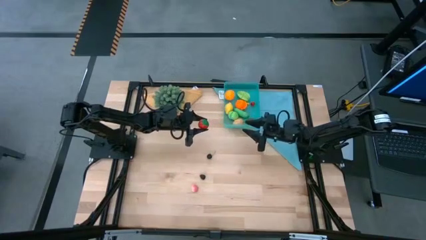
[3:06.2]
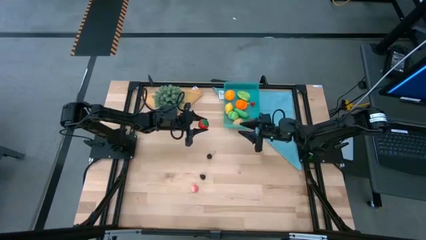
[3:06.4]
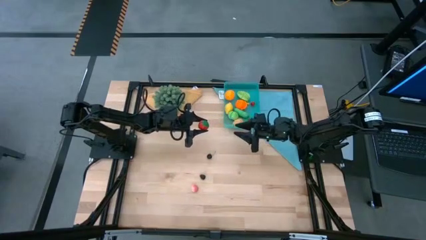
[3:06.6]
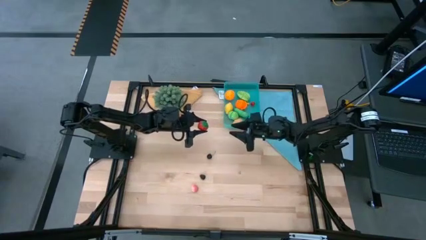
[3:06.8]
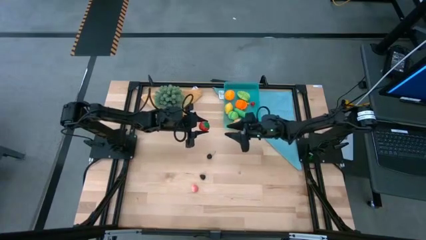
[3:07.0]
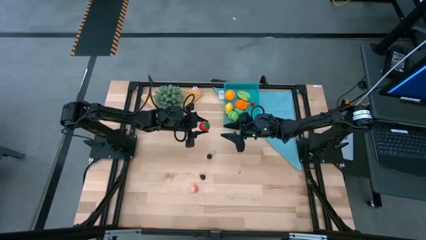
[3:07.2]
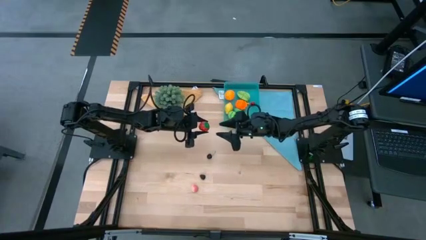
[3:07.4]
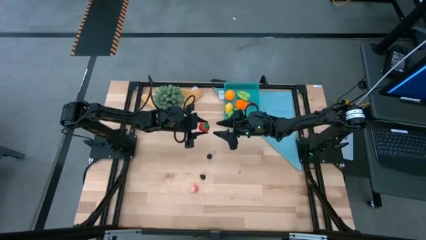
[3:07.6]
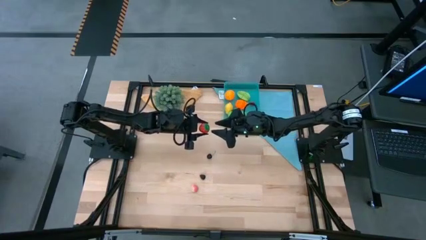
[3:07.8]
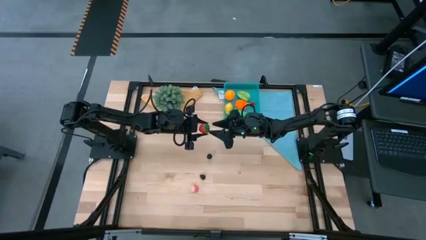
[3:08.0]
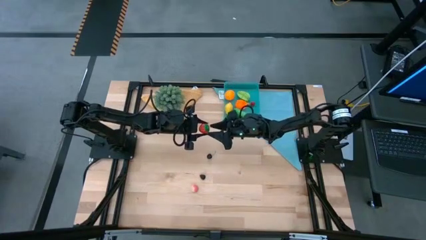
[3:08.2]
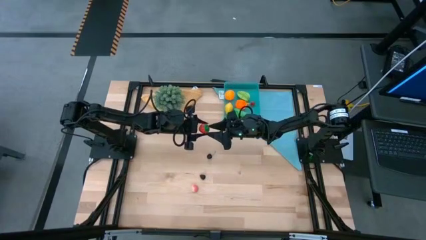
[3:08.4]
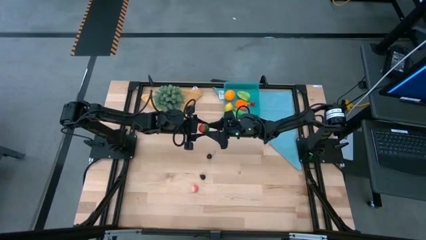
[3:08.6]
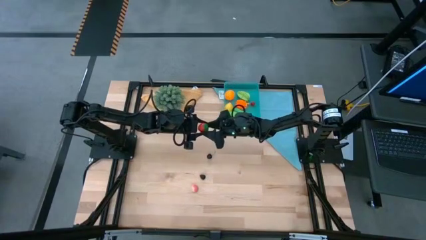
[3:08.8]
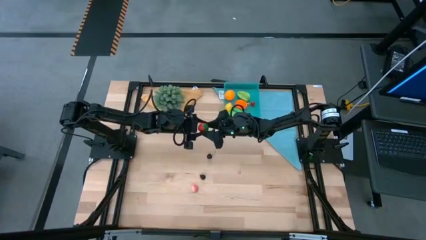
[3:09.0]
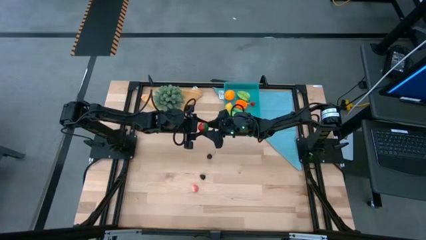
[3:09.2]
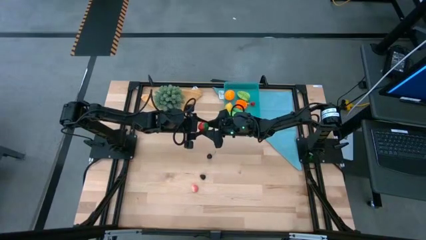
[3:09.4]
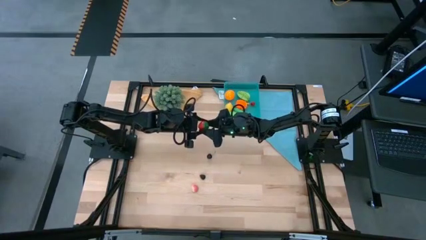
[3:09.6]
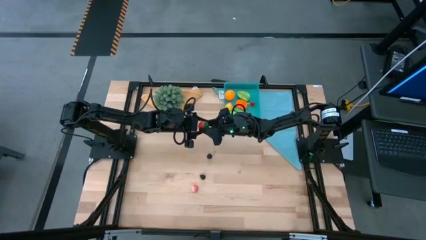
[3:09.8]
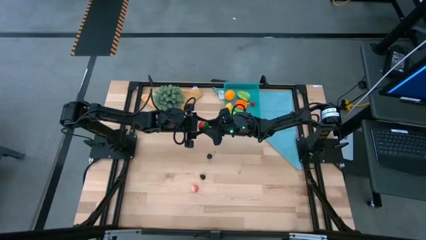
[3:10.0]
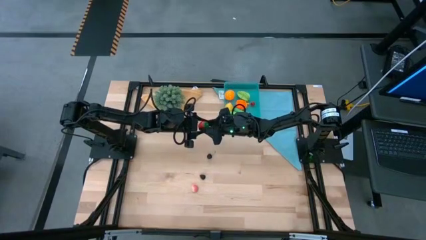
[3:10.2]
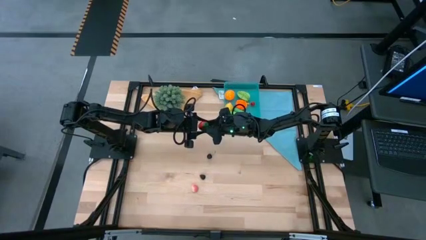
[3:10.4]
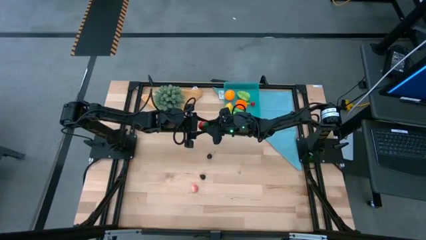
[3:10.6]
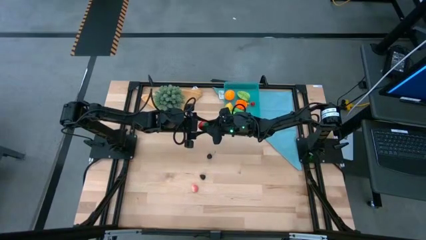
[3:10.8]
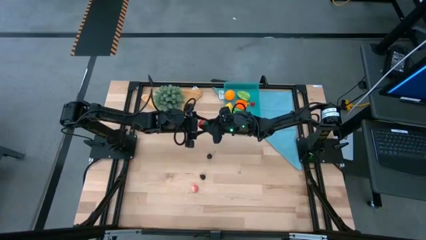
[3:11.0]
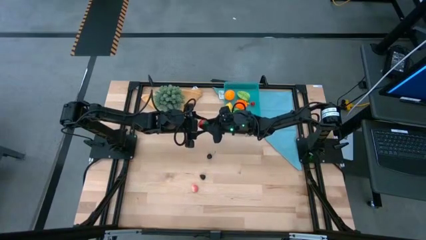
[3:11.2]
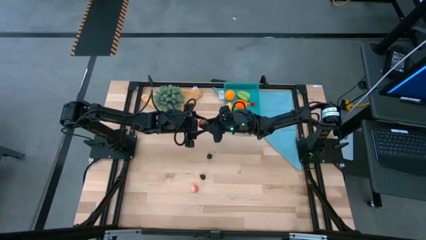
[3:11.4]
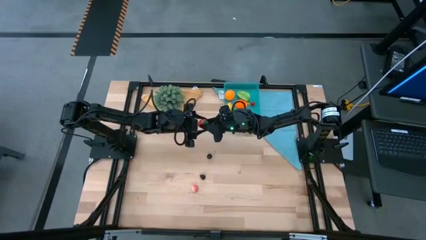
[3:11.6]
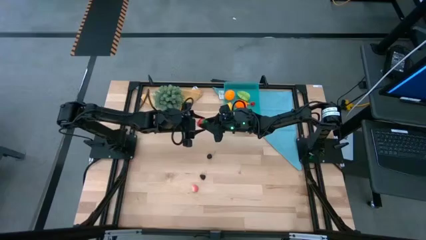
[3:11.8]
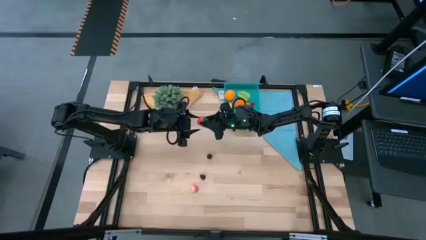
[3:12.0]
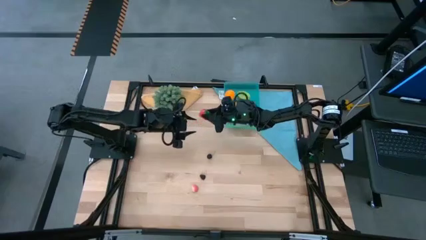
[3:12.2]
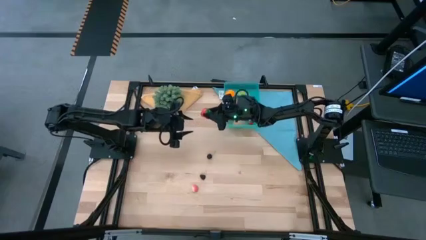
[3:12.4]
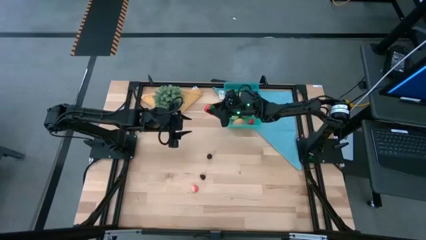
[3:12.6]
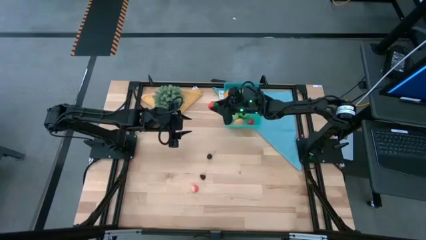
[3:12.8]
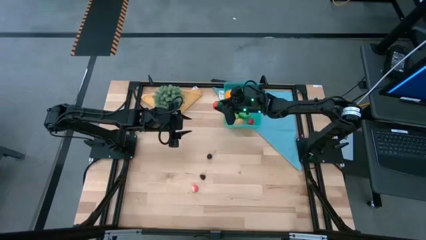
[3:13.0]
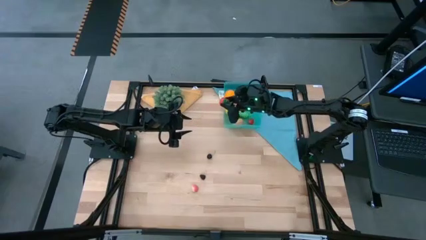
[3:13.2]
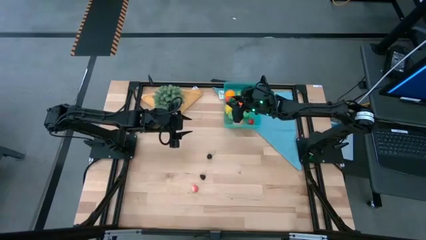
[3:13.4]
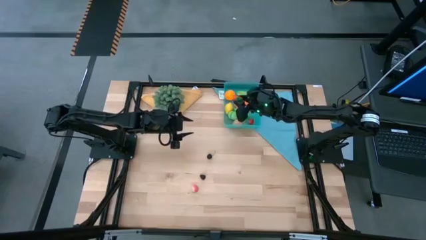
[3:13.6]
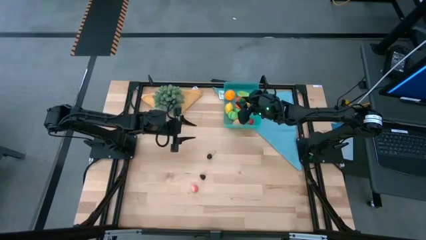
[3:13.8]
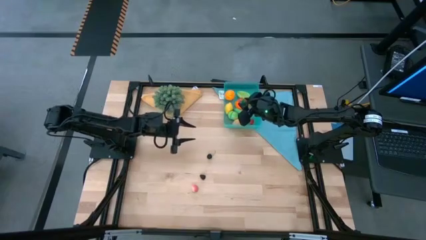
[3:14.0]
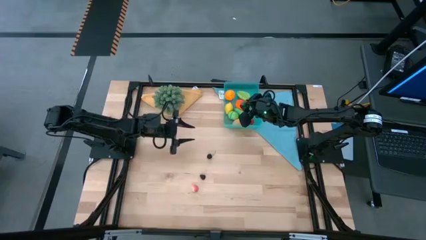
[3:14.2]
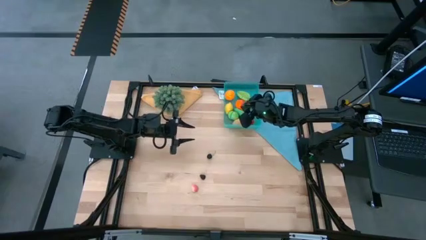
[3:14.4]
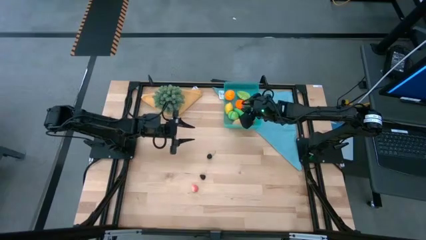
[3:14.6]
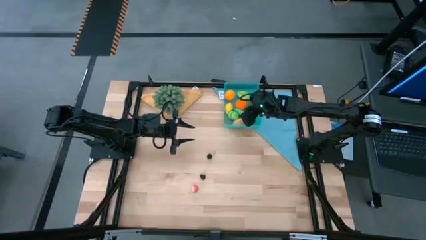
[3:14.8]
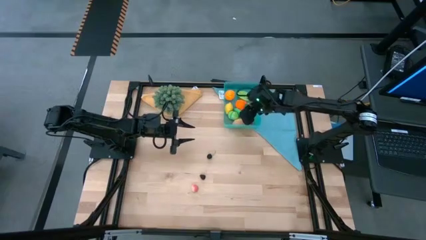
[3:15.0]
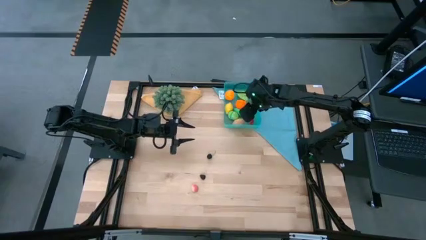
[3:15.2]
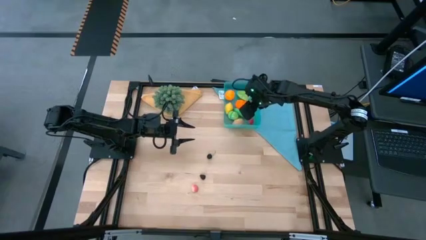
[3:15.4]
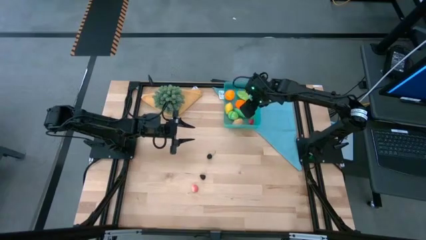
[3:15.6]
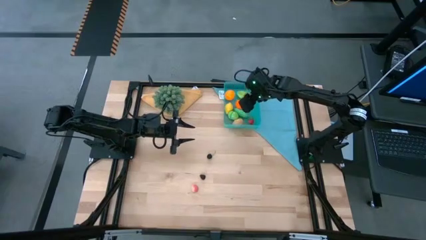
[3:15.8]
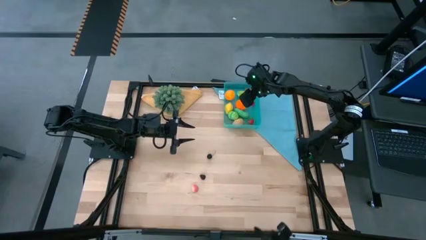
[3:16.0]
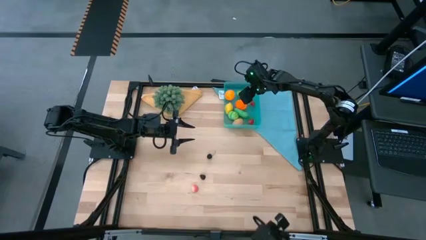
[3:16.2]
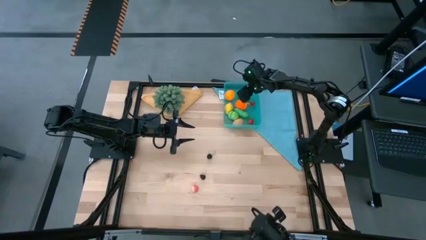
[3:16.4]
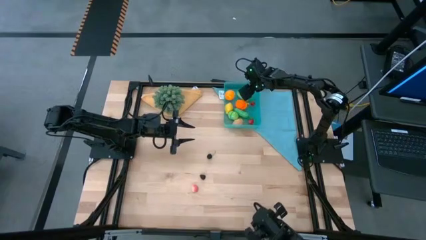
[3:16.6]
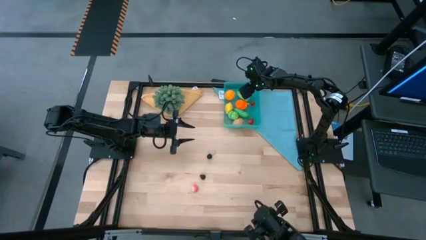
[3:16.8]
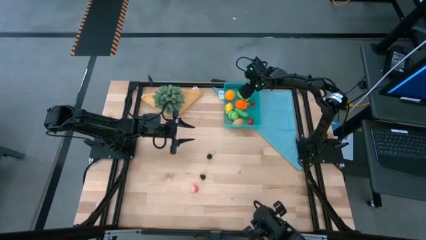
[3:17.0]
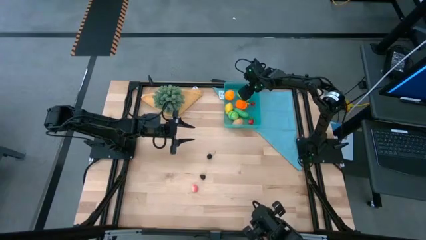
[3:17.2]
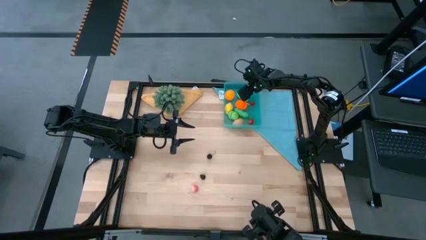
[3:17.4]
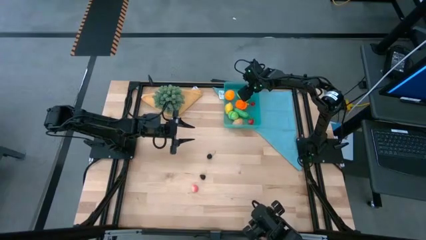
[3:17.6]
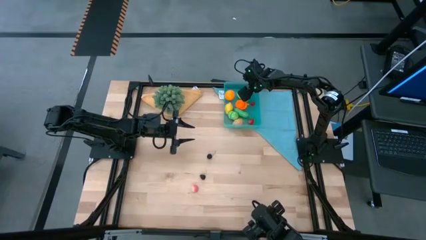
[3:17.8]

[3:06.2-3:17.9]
Task: Pick and placing Produce into tupperware
Put the red strawberry into the blue bin

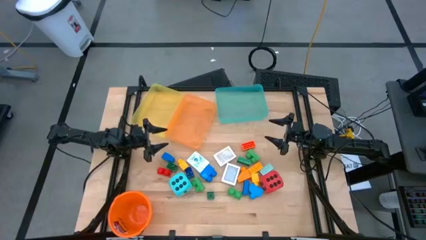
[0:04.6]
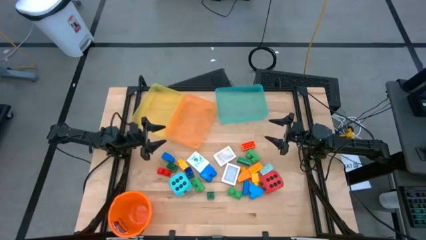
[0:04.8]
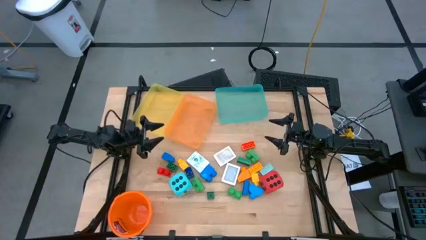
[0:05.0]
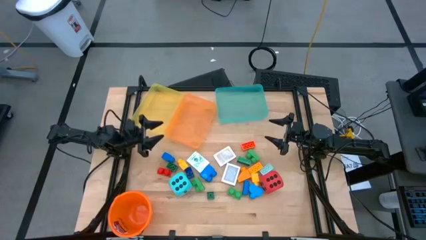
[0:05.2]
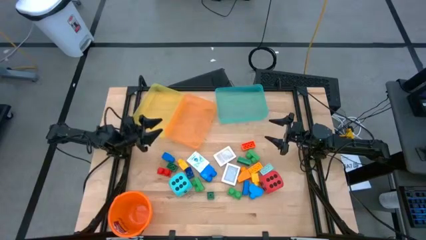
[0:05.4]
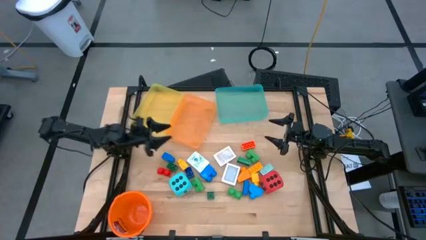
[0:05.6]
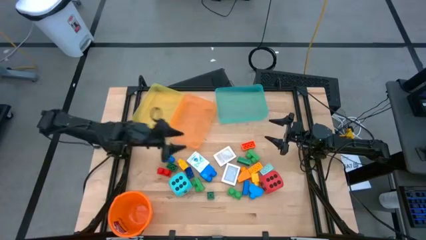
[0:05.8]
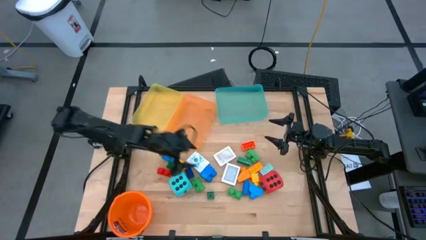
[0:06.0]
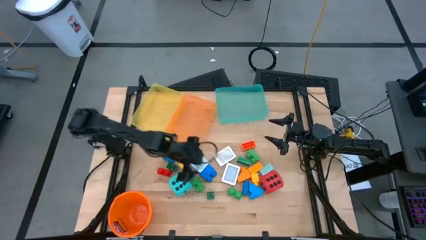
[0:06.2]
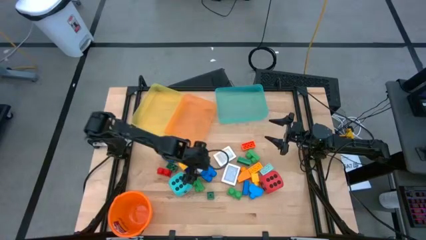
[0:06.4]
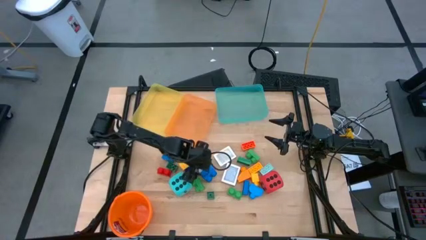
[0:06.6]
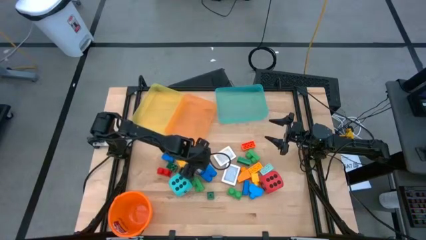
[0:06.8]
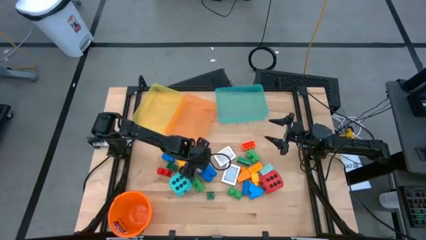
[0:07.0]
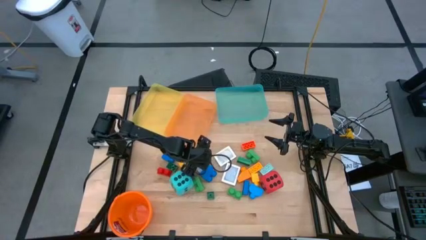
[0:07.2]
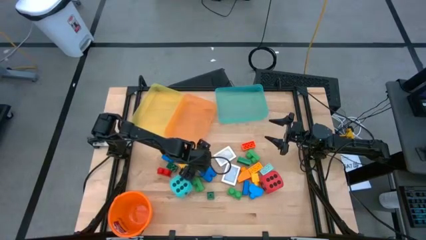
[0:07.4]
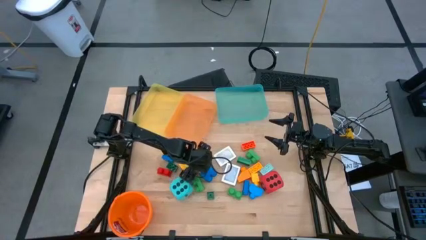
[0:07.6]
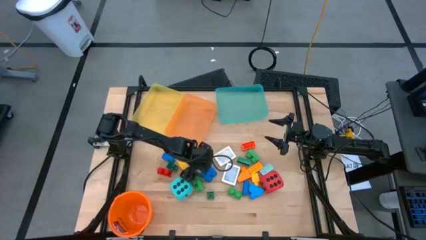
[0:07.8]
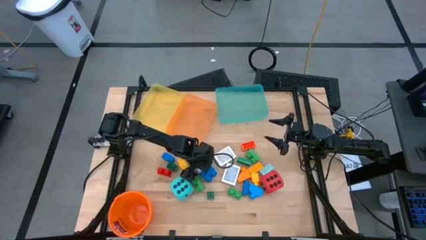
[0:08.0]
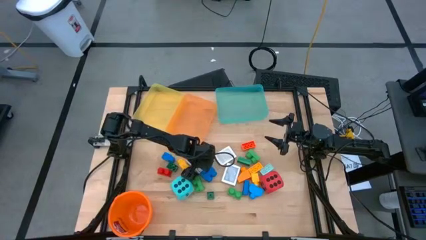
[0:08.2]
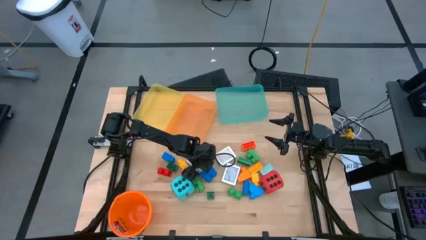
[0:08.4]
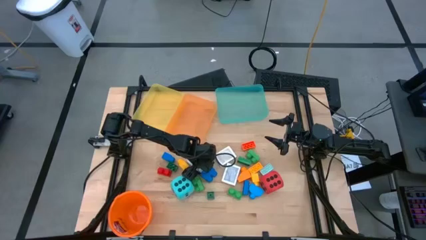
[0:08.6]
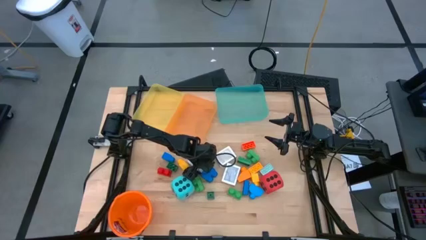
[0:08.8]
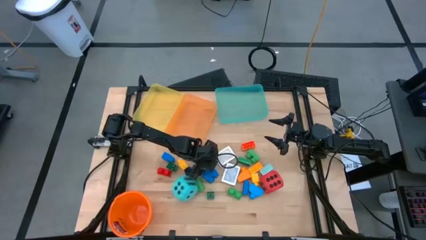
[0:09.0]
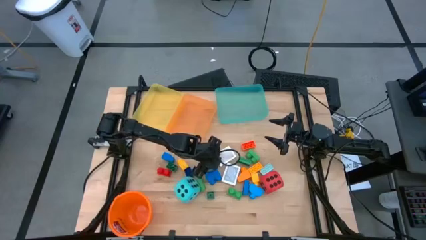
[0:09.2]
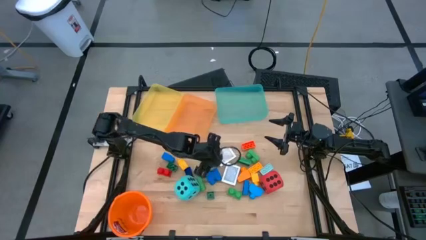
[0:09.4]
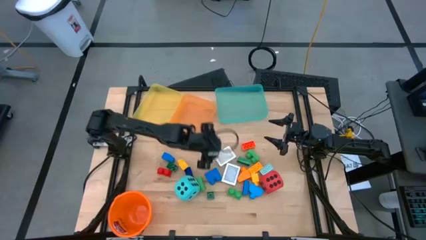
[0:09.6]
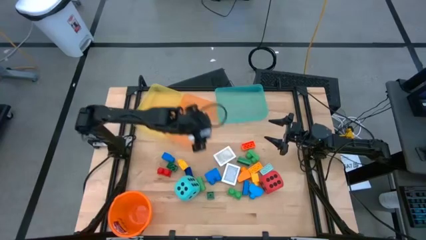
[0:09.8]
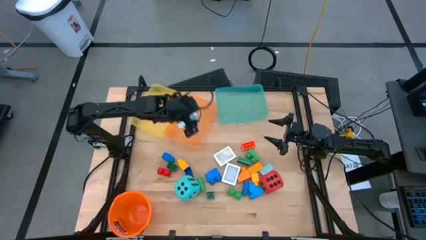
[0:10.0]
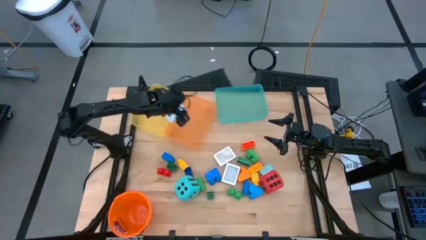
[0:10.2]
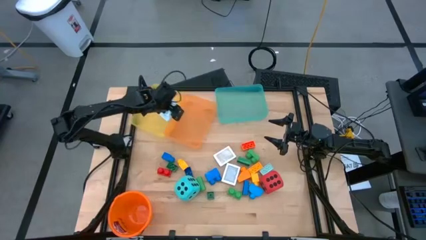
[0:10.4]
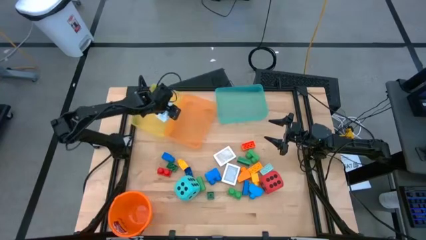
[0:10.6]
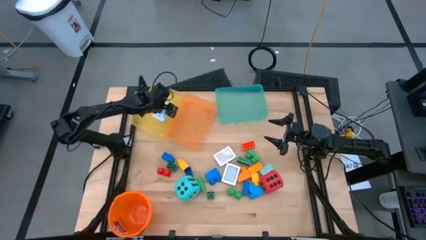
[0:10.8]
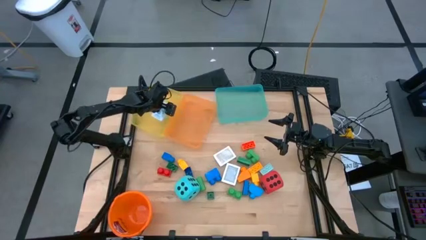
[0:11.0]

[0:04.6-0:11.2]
Task: Pick & Place Toys
Put the blue deck of cards into the yellow bin
